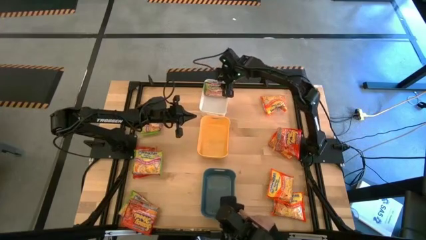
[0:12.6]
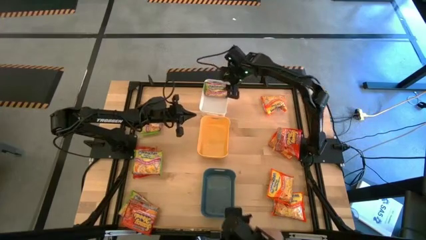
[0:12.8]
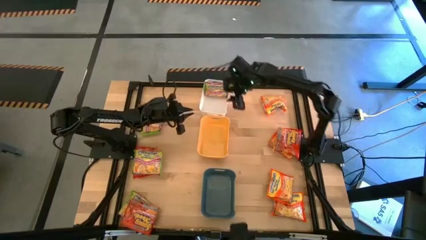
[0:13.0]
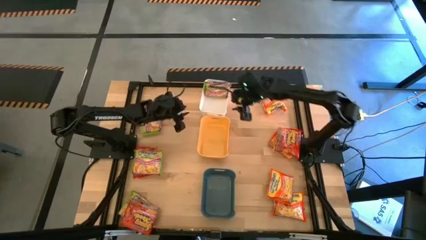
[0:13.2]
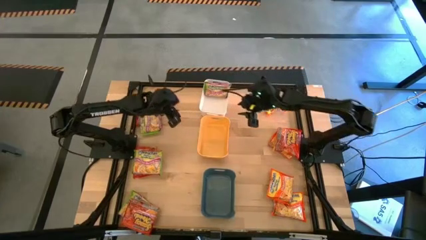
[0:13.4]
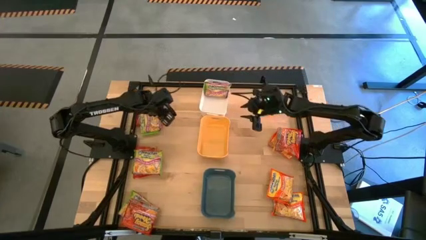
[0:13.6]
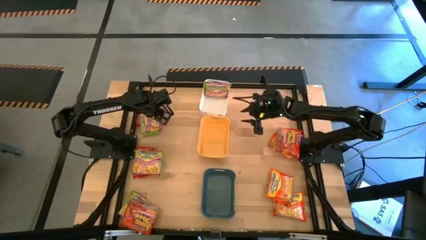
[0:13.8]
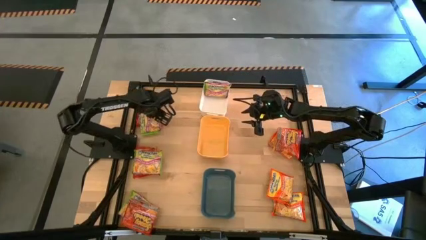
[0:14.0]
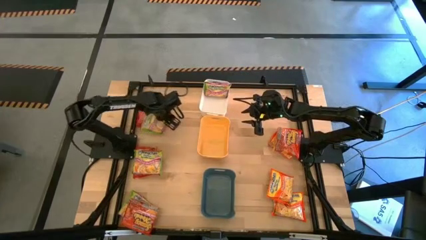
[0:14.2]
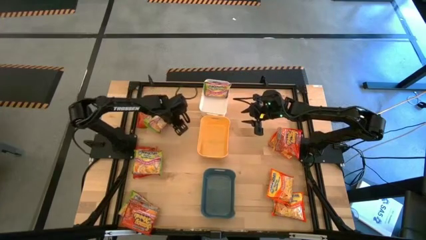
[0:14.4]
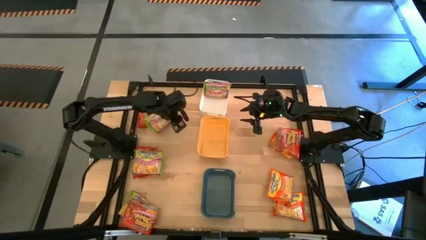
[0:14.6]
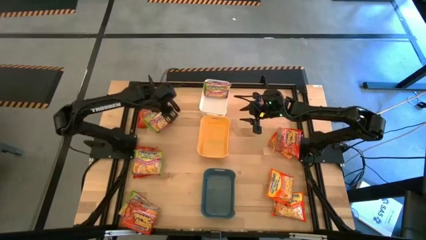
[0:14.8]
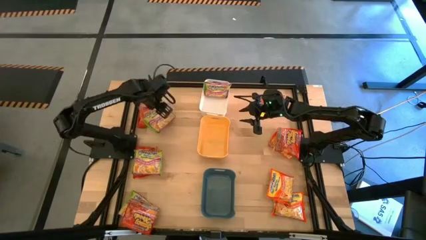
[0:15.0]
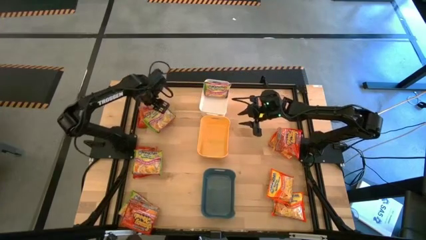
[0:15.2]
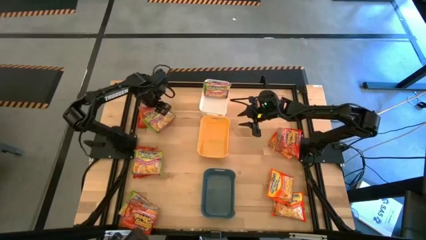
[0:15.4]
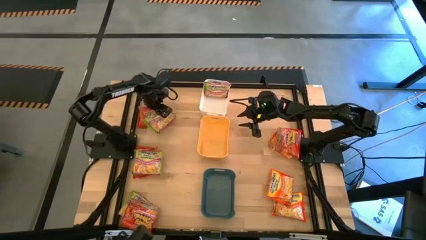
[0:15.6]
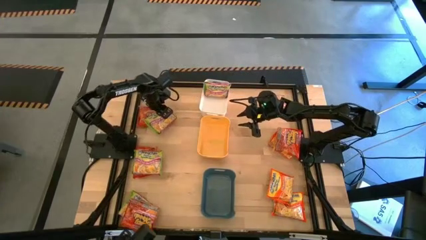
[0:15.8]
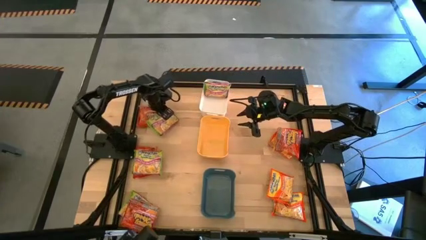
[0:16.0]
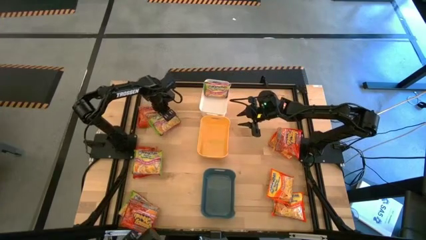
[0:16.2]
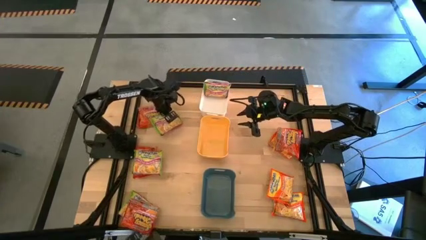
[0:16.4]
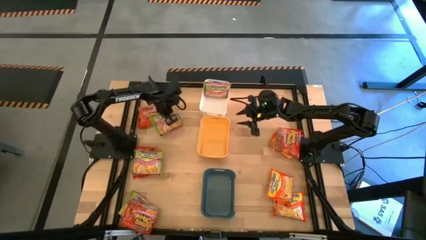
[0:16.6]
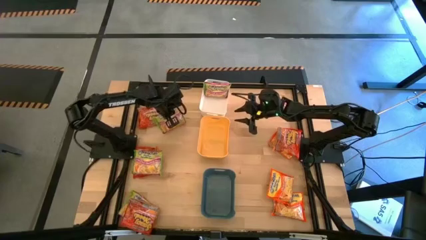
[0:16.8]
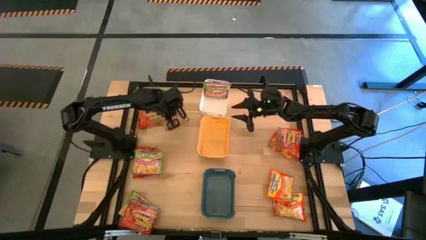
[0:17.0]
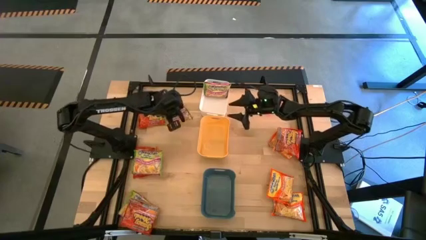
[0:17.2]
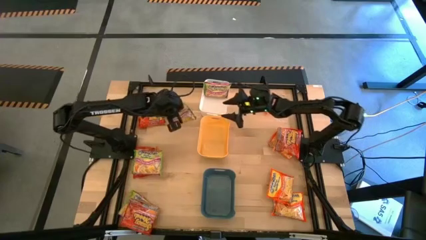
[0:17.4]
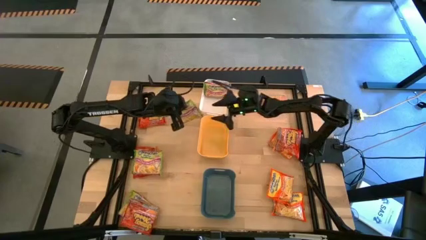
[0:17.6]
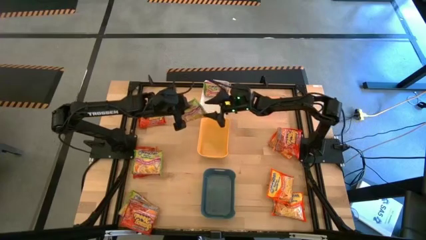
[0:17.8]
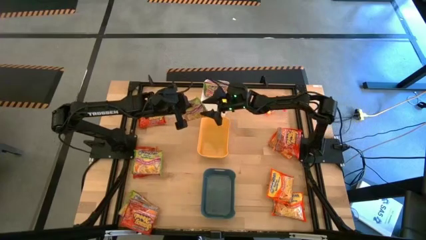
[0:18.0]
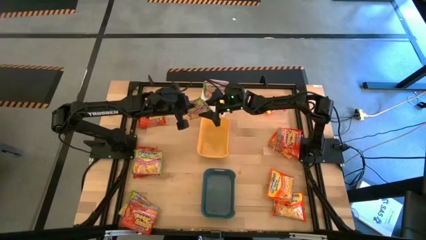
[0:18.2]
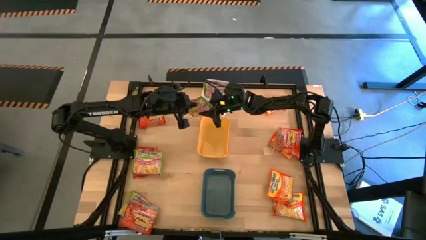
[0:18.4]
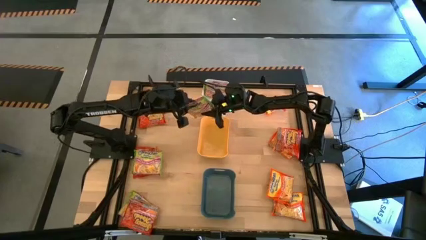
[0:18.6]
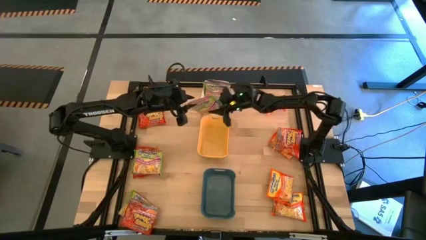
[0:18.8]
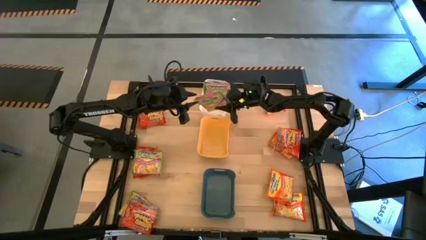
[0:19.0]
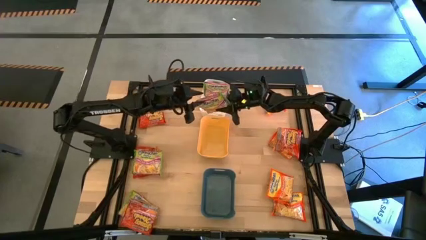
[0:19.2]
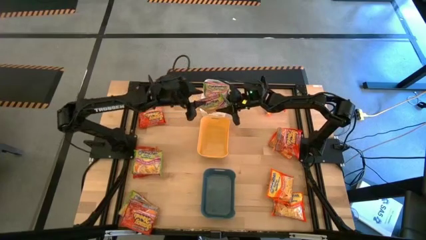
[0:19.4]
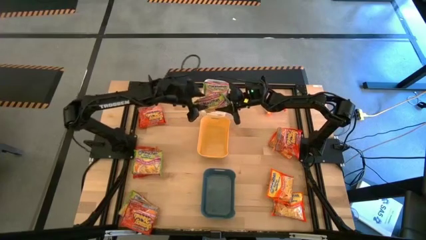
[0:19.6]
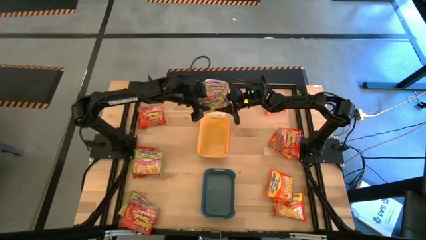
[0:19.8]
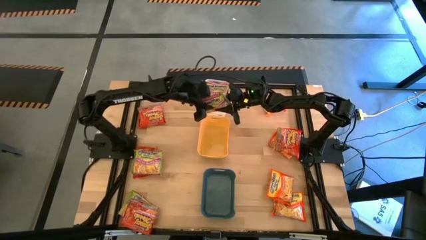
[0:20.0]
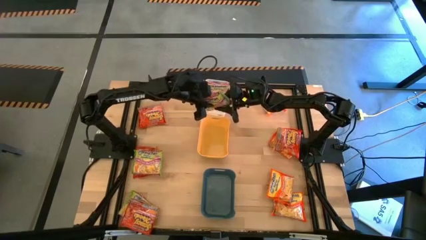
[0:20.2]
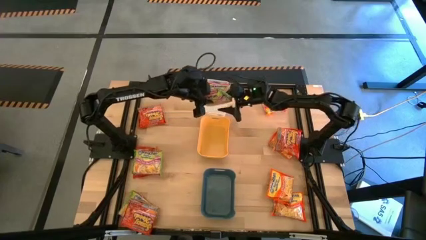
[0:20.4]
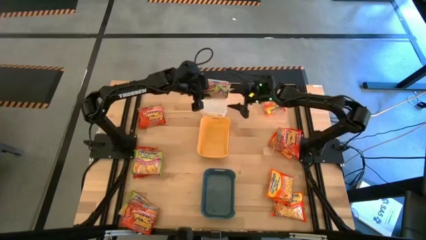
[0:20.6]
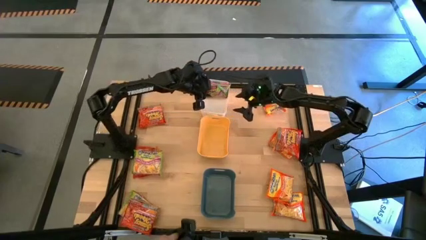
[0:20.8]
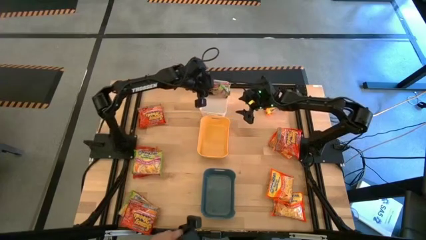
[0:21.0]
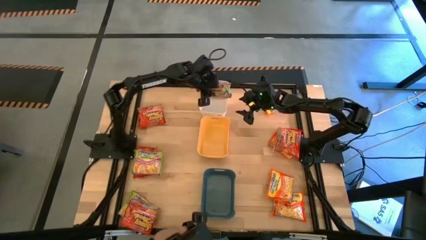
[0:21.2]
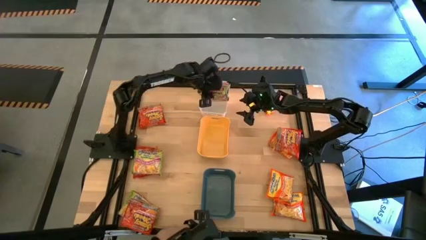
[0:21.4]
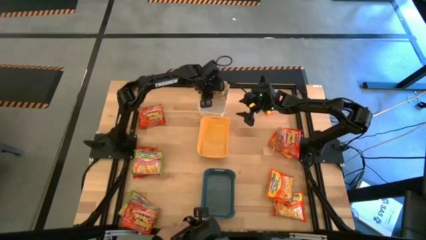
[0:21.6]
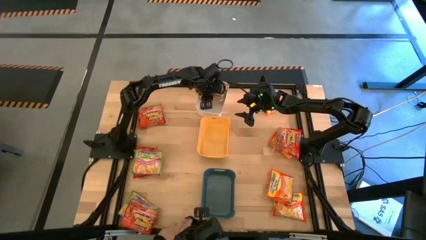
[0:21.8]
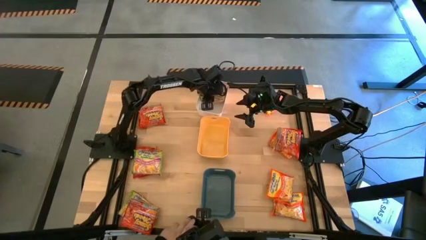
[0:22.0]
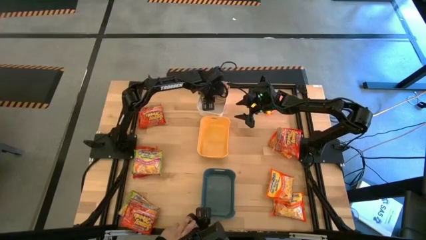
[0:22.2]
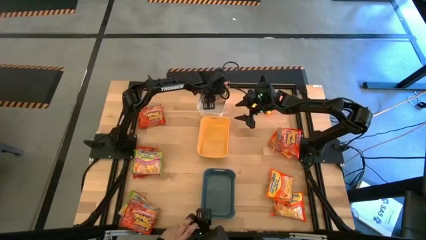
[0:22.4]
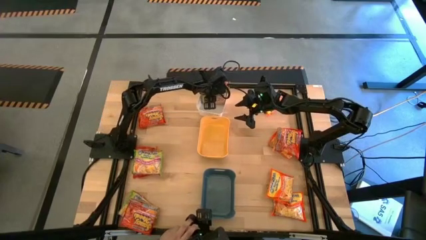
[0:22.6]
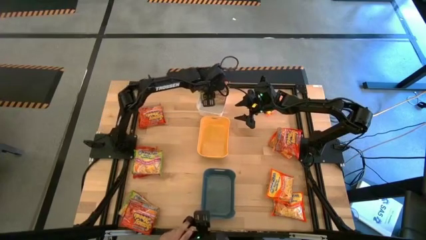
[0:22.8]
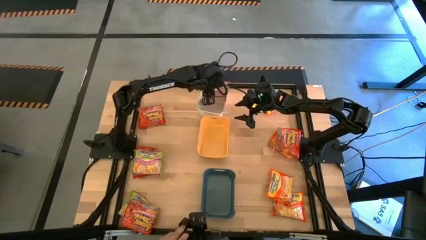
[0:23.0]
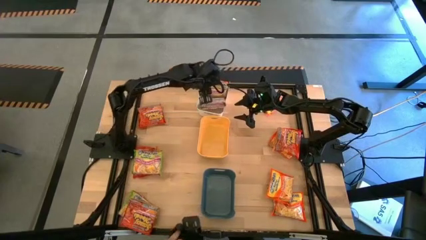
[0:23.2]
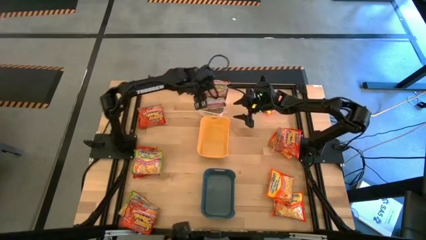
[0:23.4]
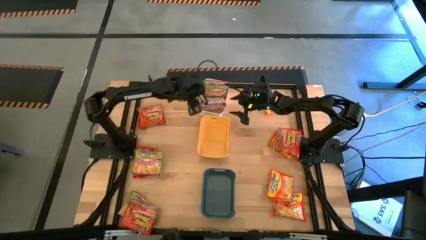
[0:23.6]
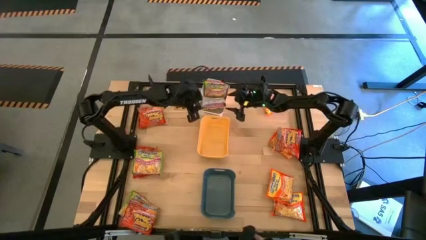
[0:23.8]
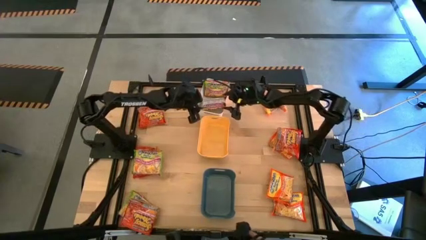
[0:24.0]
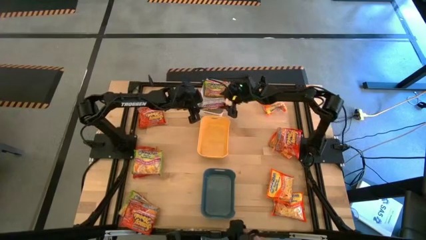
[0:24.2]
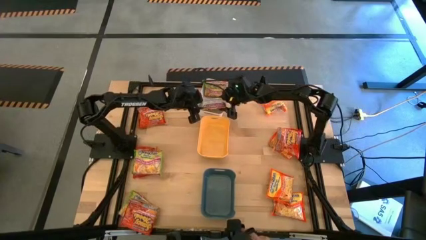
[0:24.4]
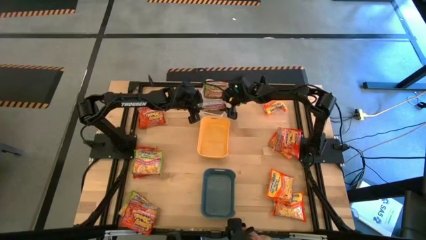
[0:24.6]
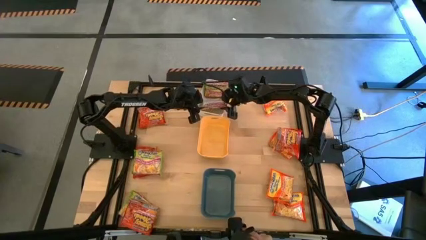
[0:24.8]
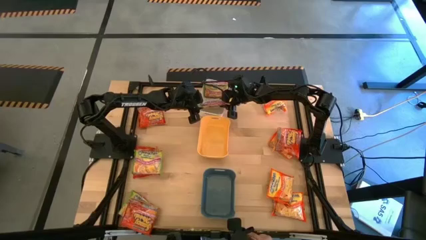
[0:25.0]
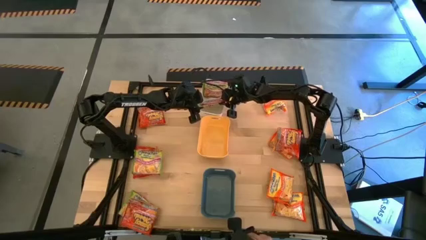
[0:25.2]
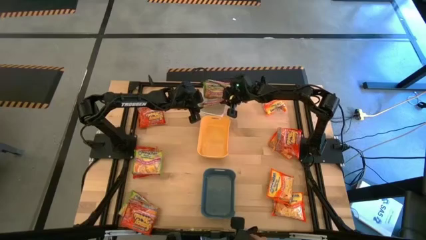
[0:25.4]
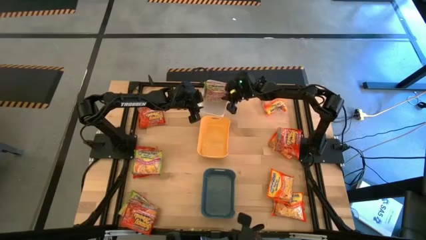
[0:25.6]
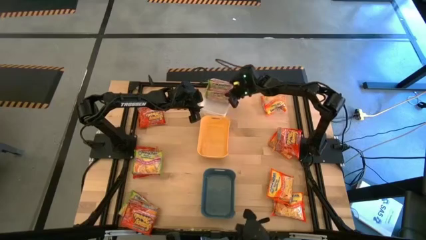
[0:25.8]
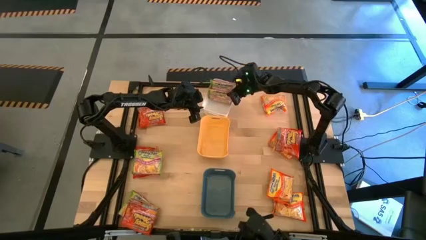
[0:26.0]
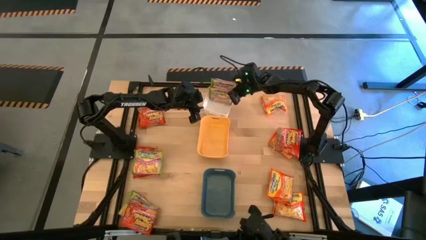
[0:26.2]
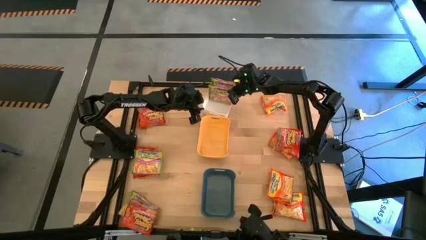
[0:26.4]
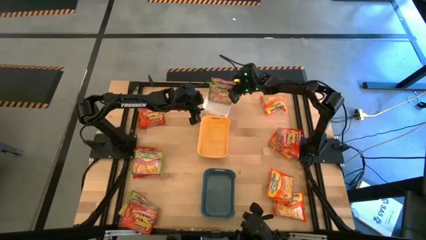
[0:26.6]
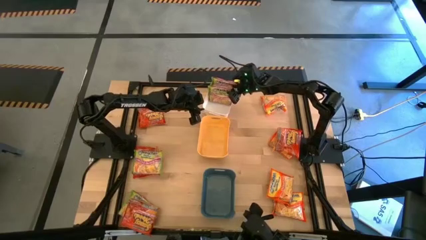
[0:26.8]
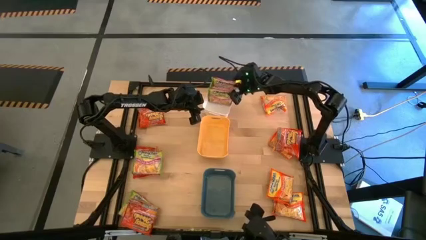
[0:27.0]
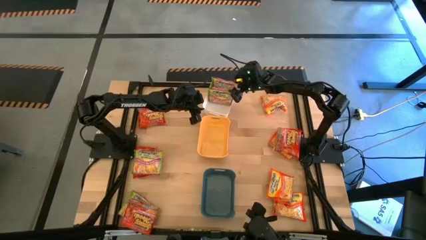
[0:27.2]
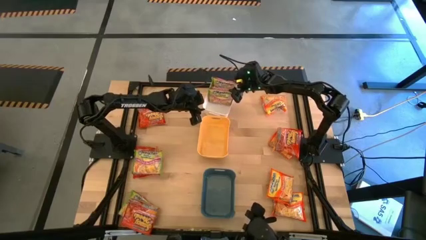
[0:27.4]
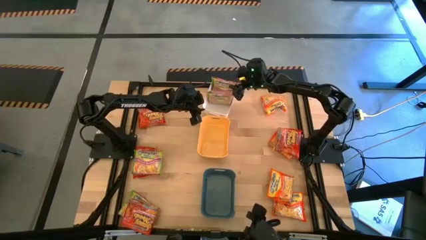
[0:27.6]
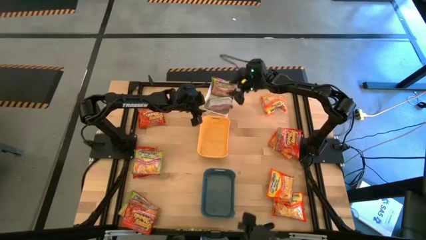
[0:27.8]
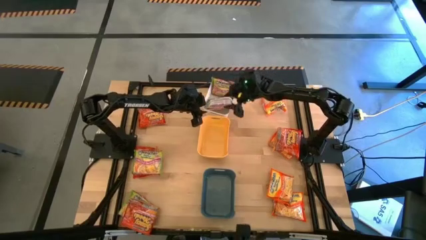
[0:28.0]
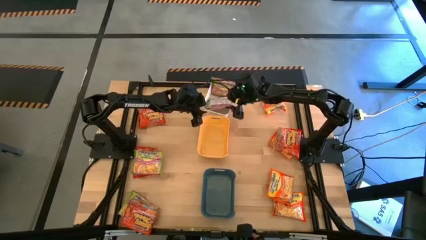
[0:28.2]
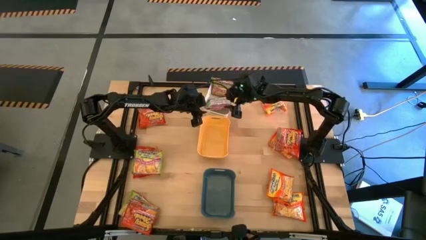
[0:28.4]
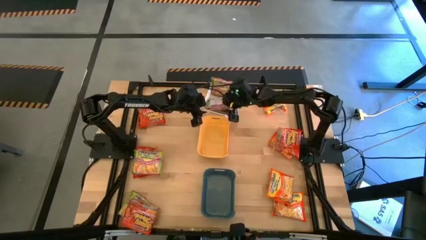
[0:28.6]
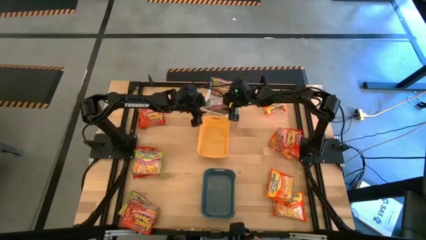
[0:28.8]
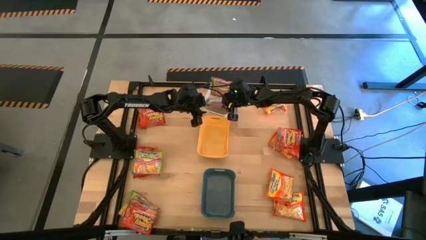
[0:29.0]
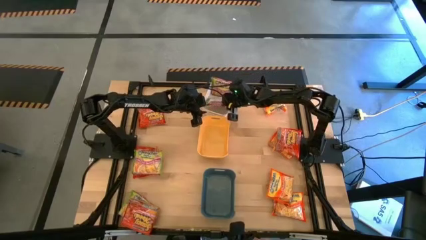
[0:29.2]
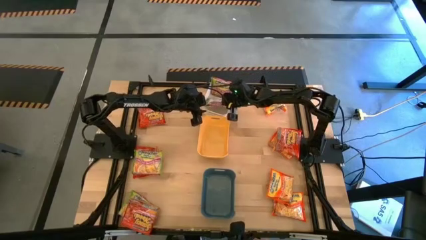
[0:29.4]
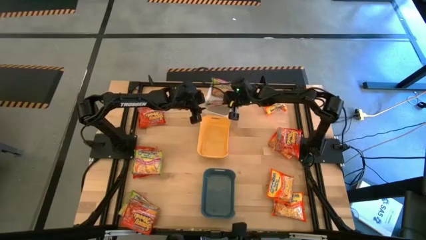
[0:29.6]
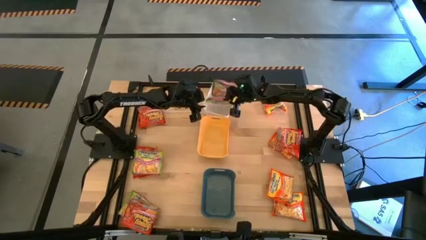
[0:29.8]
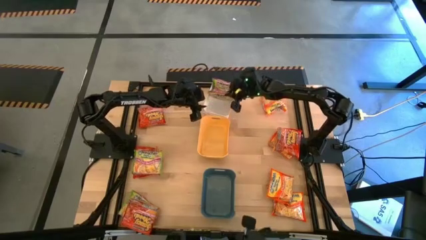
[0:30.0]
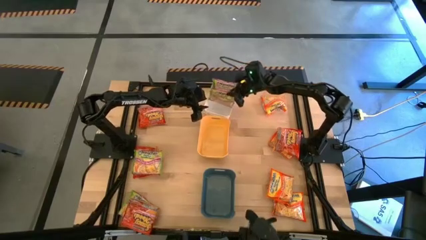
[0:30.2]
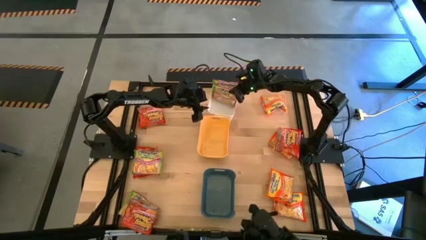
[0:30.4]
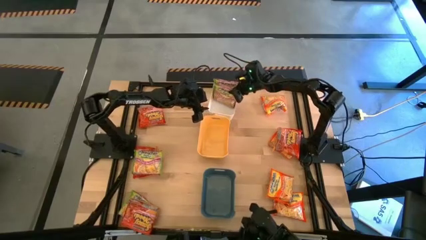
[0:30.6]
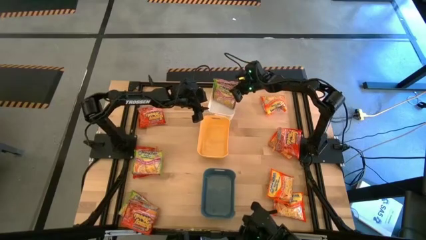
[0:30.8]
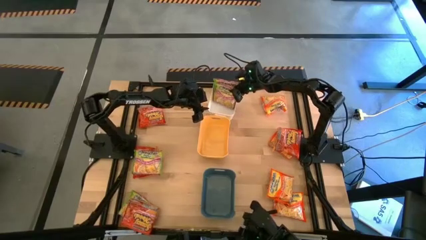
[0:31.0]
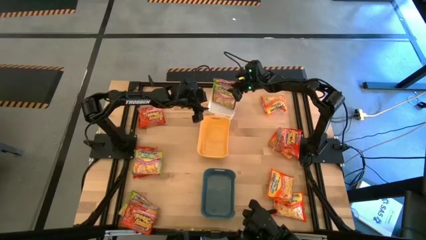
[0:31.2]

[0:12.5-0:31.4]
Task: Sort Maruchan noodles
Put the green noodle pack into the white bin
